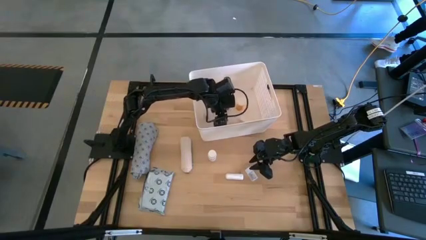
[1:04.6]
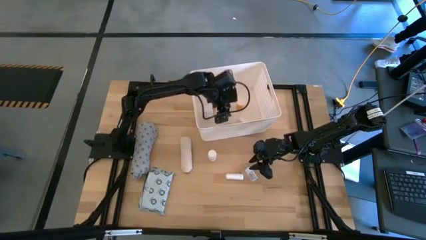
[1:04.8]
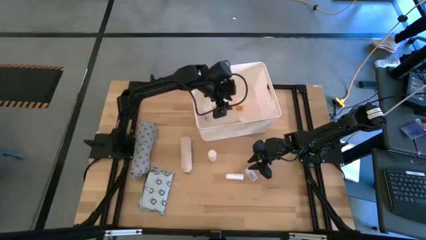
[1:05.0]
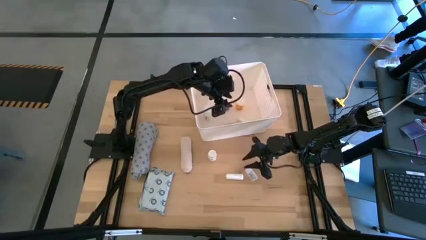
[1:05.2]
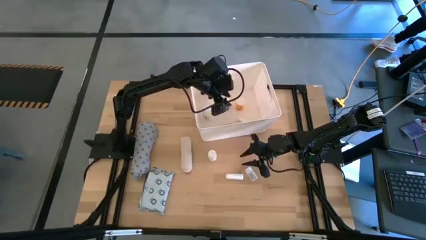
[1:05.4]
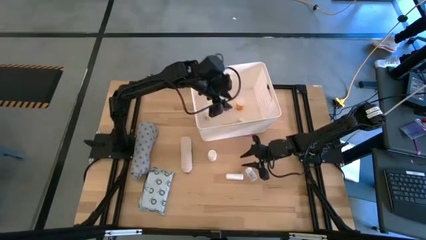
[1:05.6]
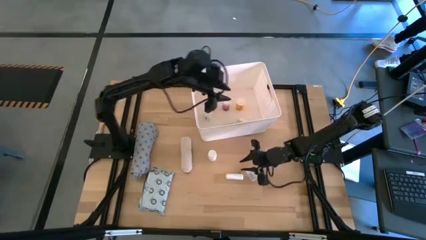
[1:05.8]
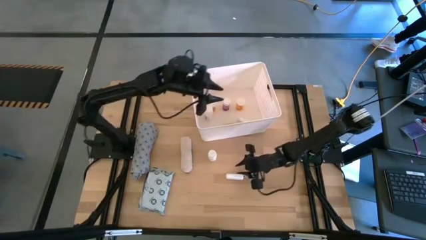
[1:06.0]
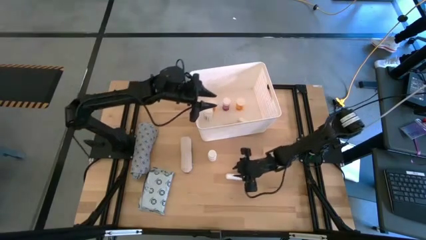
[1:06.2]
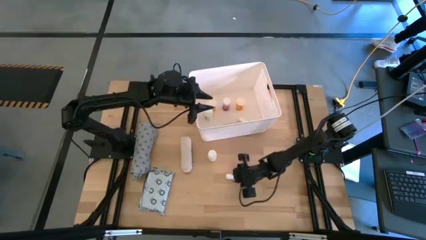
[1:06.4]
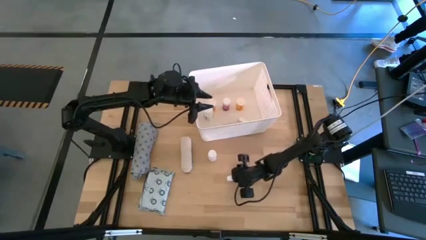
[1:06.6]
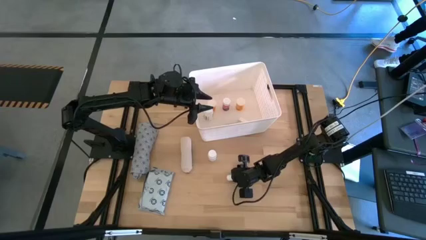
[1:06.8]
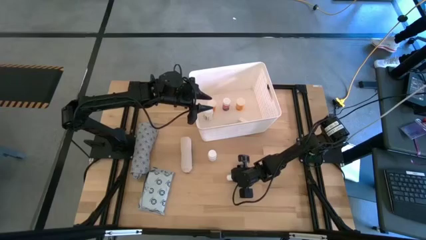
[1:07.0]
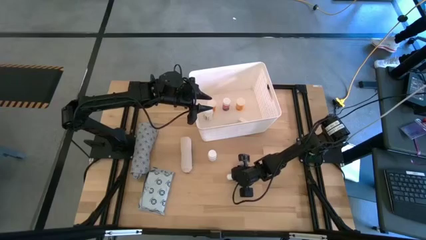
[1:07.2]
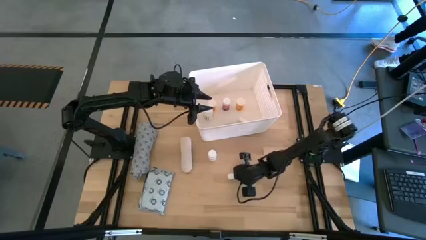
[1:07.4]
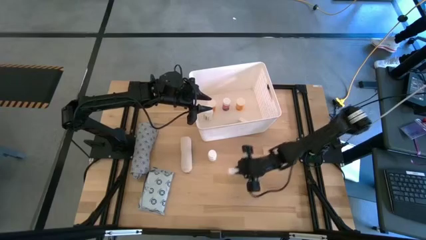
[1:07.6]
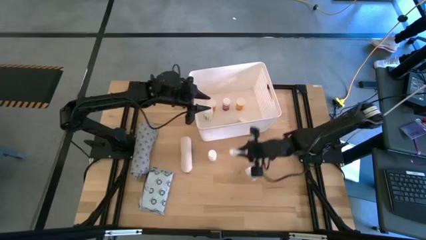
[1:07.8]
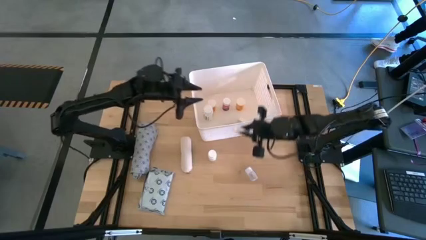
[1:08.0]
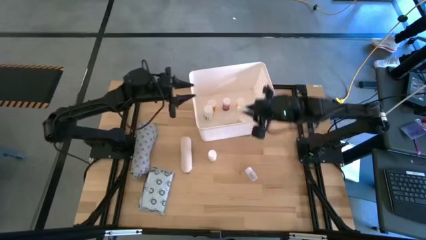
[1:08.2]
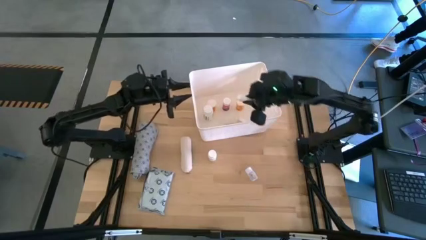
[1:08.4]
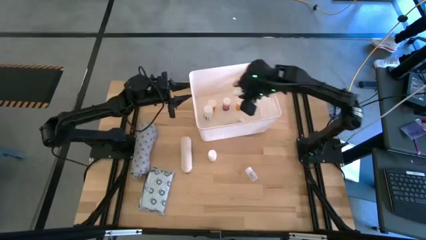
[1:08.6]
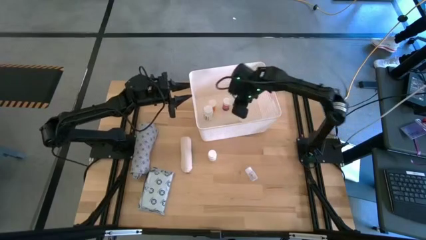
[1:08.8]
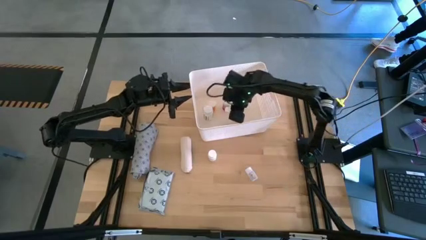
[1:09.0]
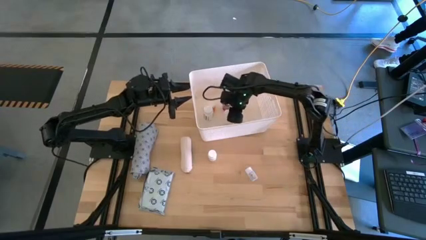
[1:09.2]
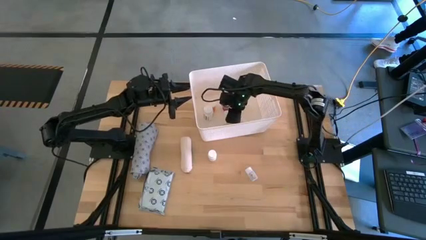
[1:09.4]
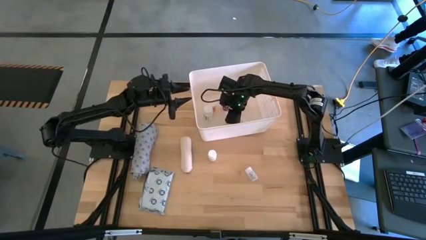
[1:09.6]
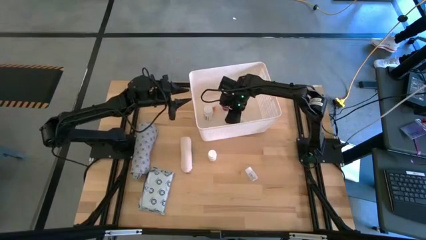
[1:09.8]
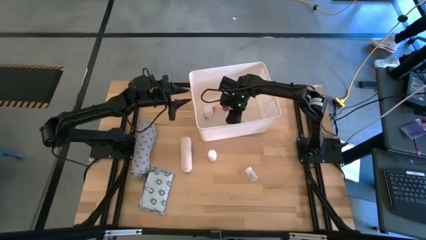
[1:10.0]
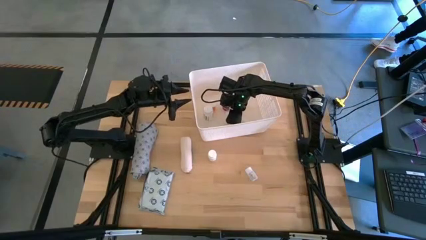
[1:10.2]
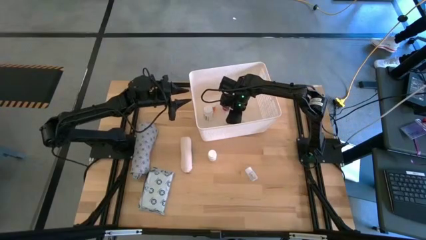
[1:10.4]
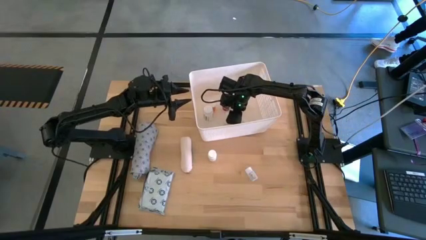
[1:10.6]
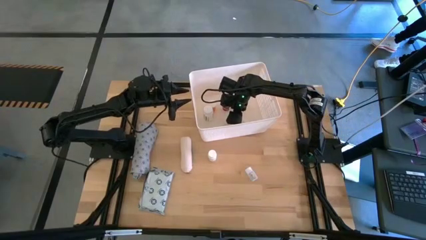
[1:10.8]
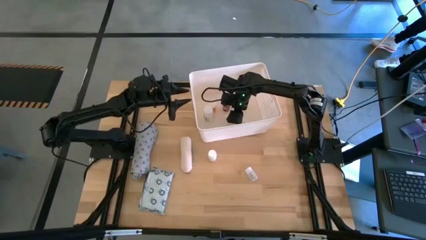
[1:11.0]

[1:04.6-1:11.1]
Task: Pick & place medical supplies in basket/bin
Put the white rolled gauze into the white bin

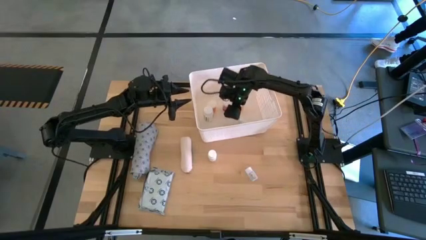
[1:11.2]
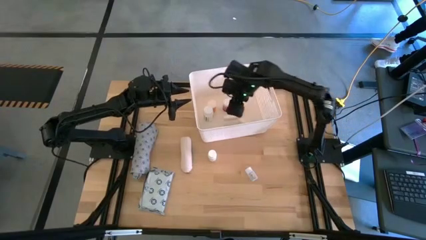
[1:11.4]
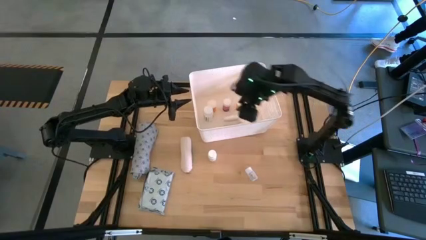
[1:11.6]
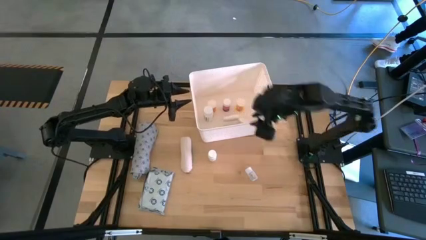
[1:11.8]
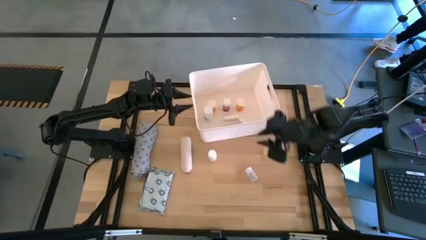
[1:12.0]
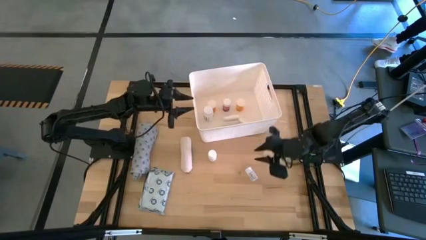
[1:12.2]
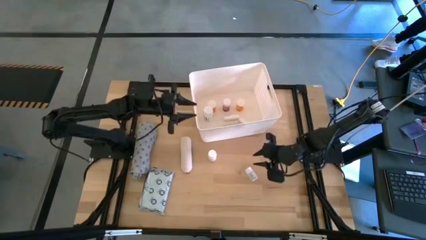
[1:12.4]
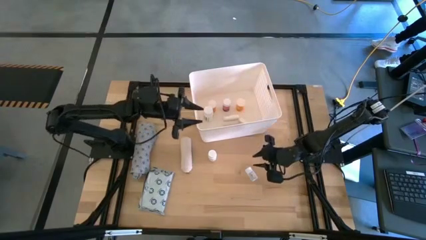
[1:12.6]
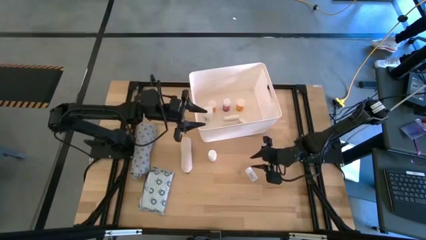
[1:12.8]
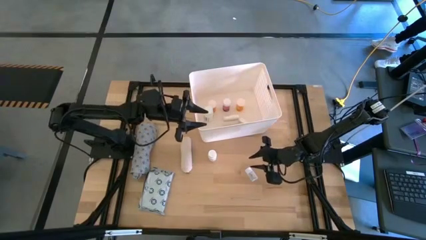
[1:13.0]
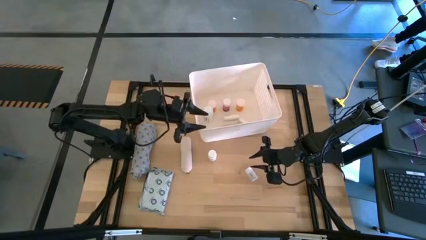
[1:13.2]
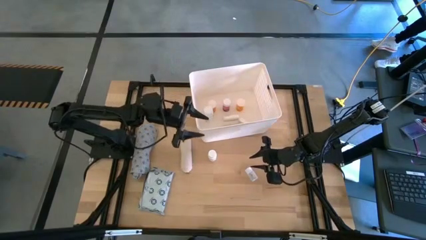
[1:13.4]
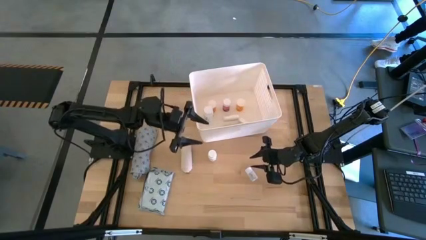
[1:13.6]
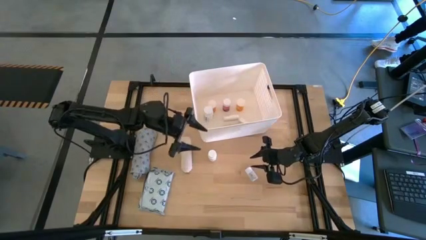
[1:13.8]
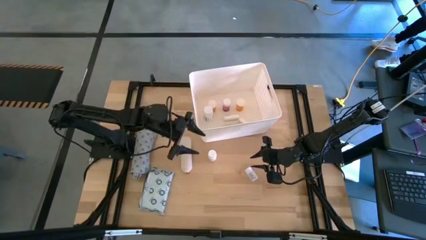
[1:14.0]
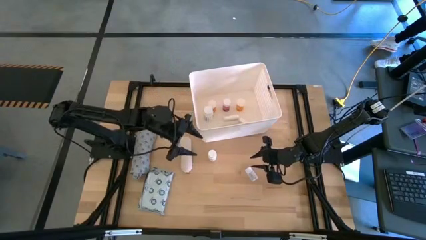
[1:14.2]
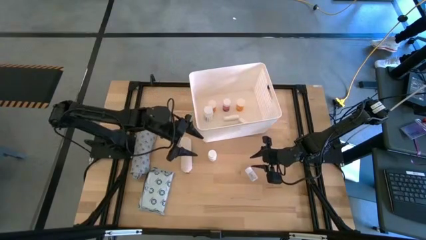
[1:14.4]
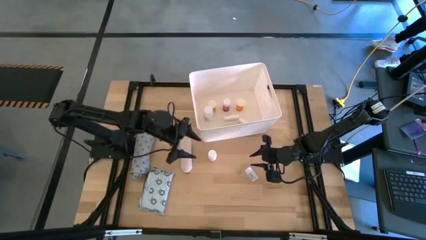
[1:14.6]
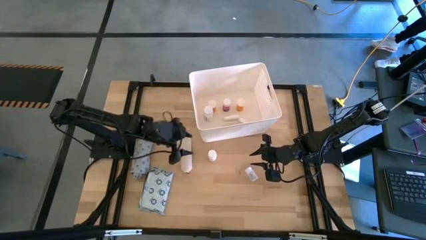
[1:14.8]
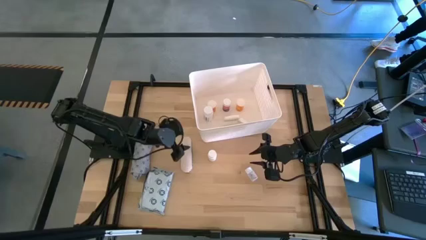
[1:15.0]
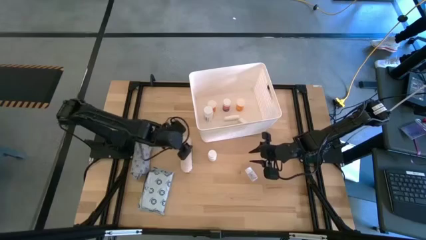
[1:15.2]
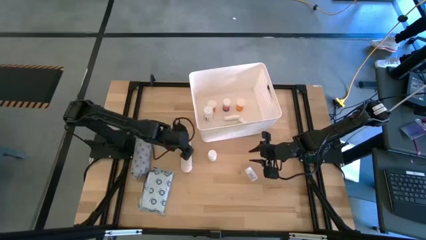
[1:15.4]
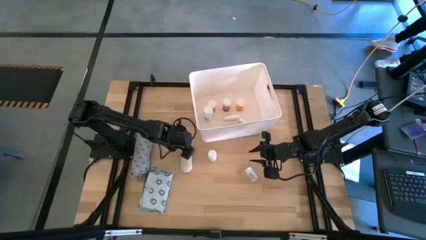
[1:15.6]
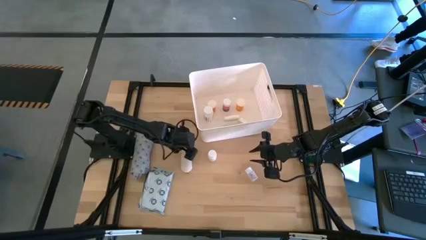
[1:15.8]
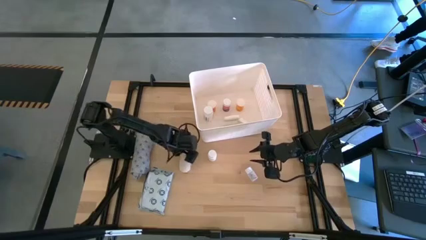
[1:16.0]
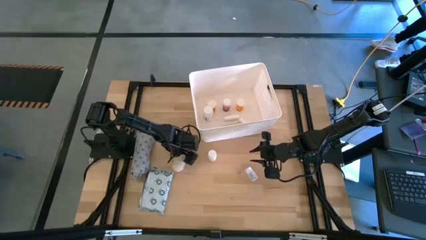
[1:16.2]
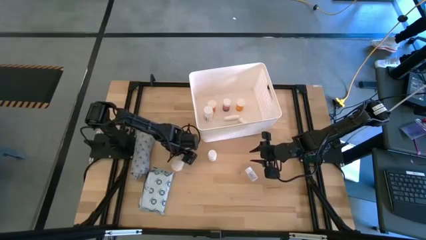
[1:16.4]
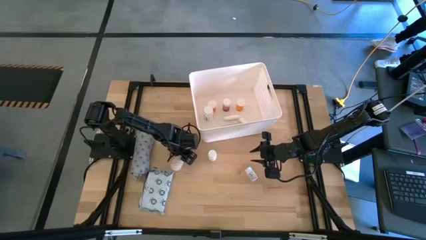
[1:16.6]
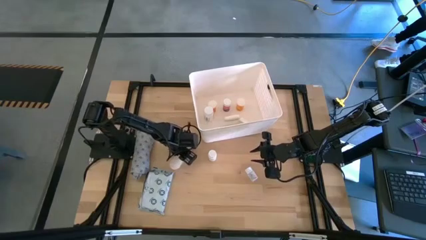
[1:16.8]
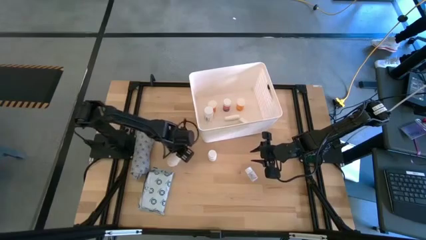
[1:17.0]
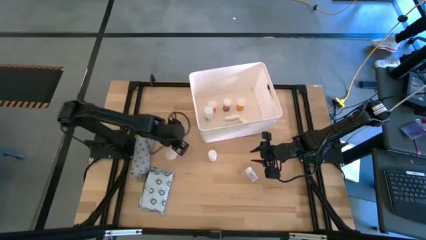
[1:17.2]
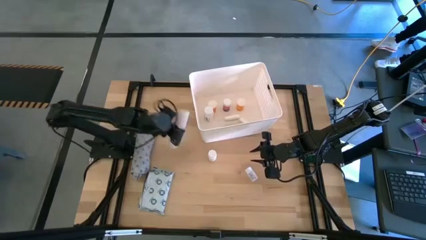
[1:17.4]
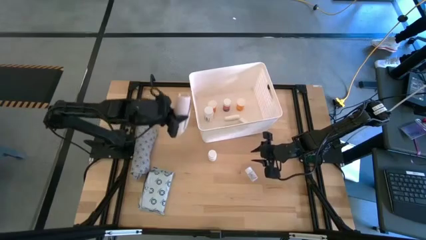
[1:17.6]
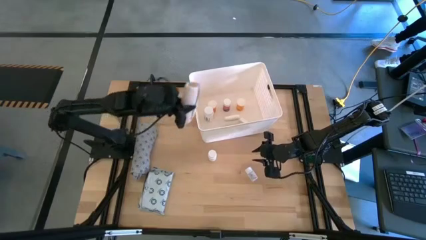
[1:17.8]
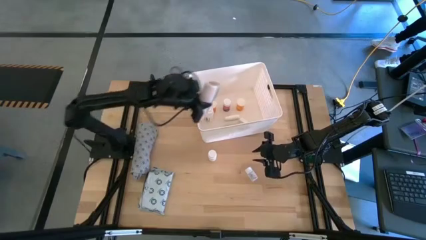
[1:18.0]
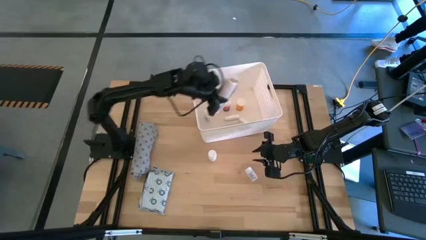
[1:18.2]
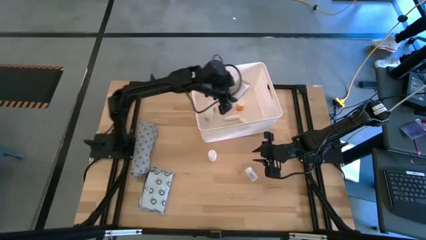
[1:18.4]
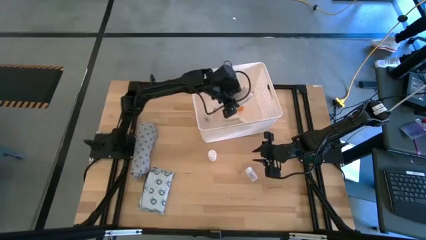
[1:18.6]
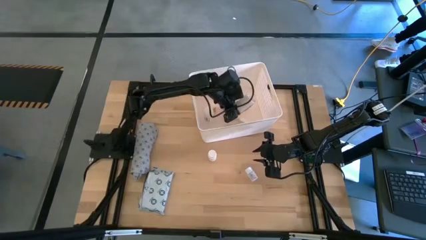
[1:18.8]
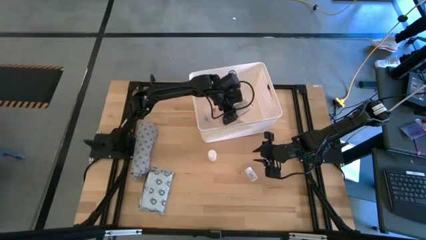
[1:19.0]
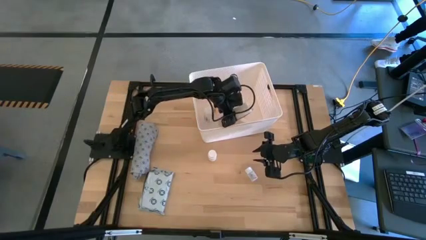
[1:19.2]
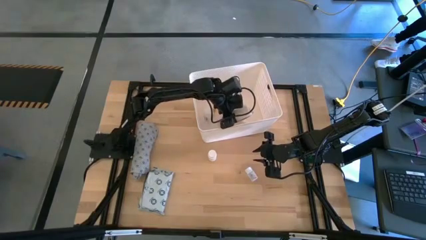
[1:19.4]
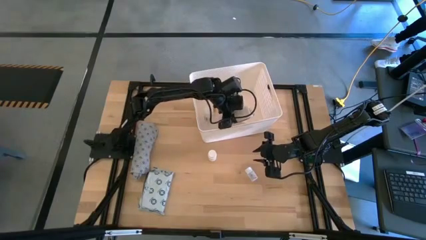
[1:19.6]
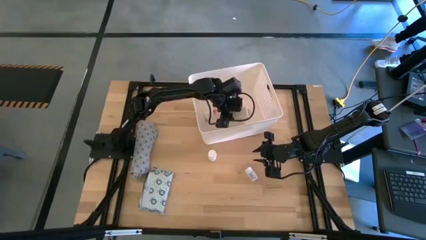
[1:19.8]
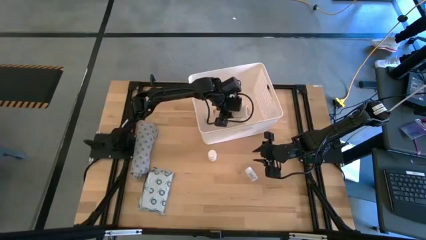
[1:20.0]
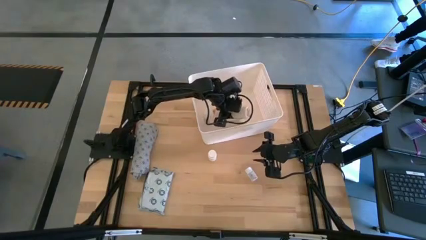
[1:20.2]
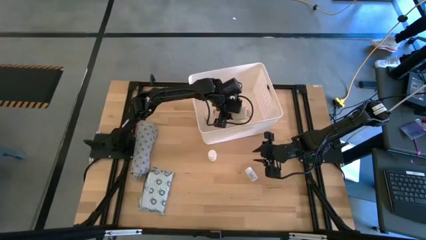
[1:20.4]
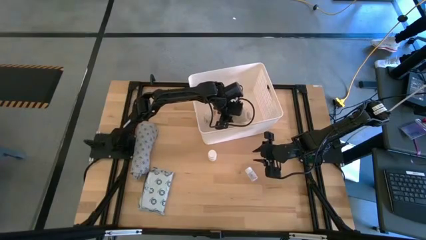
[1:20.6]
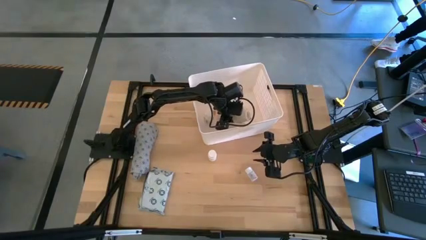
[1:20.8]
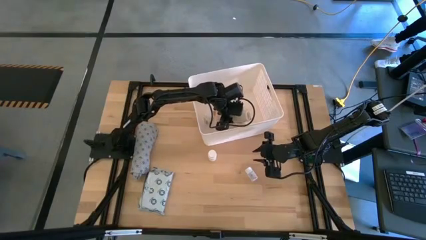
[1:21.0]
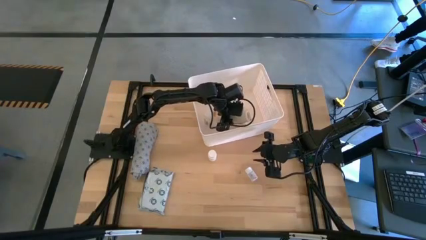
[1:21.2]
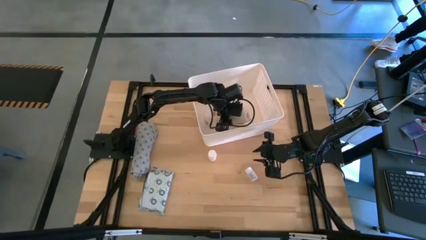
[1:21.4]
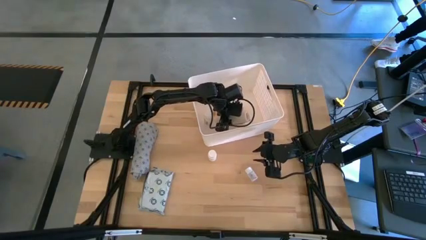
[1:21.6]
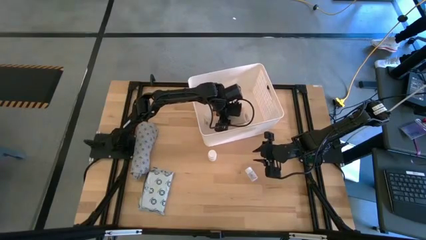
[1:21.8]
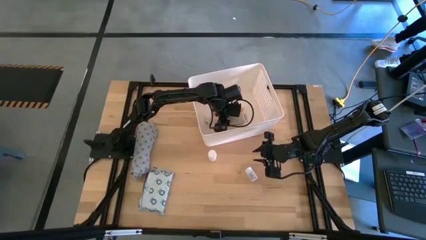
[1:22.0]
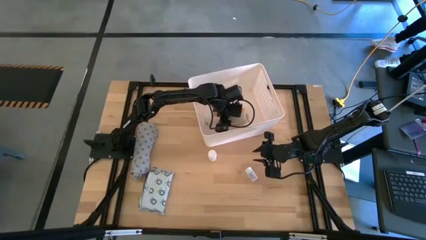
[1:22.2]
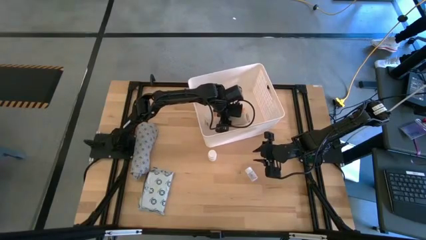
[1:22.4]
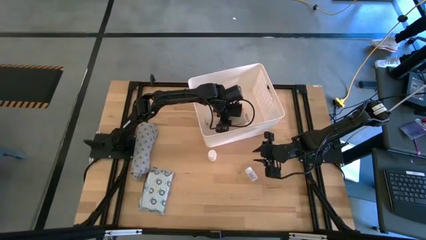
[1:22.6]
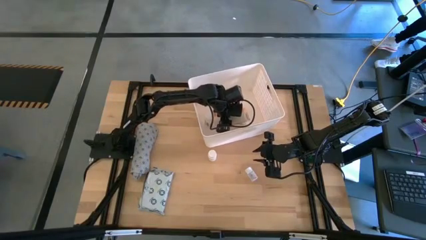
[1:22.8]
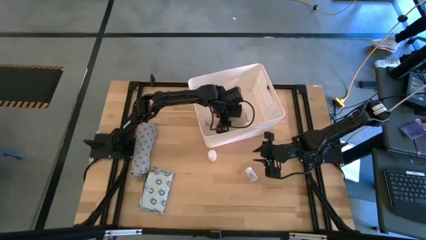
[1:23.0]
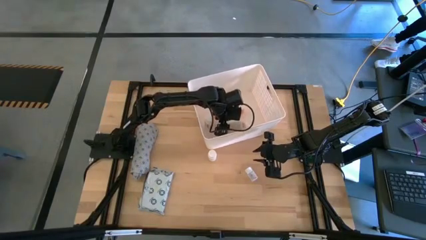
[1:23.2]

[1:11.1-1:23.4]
Put the white bandage into the white bin
